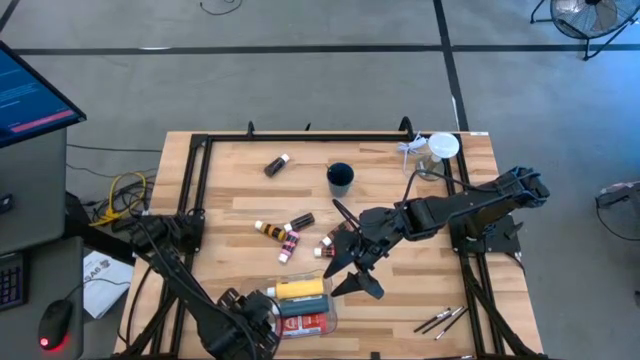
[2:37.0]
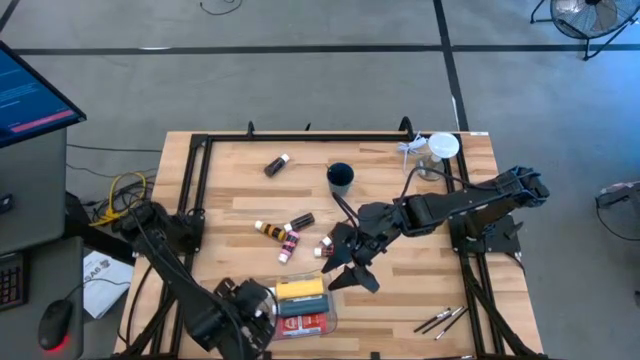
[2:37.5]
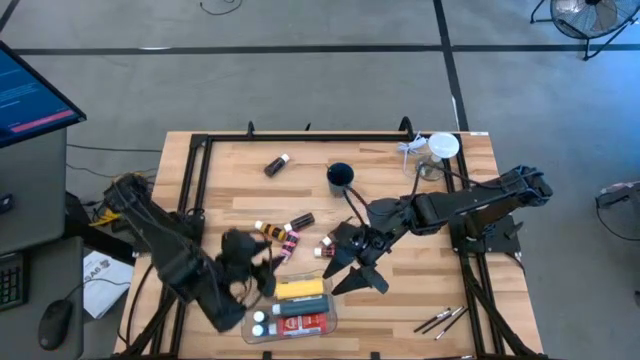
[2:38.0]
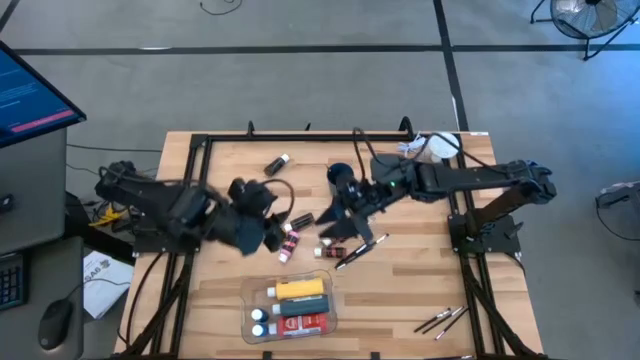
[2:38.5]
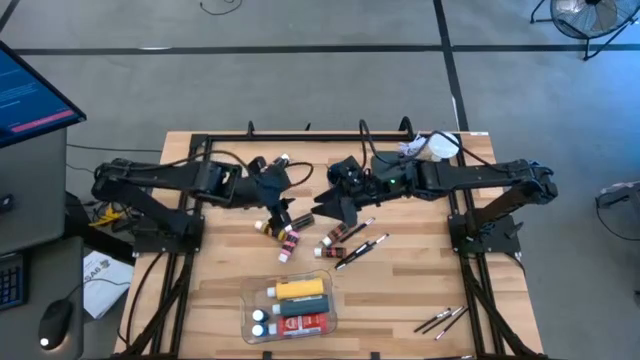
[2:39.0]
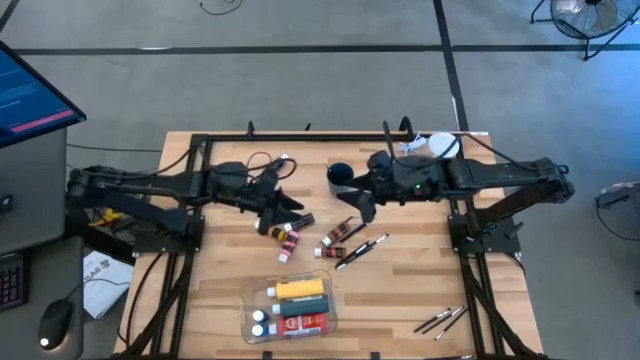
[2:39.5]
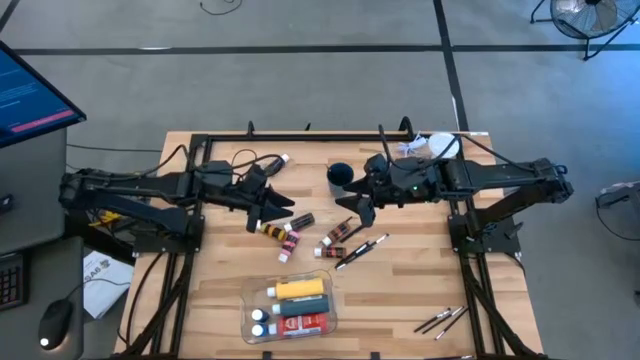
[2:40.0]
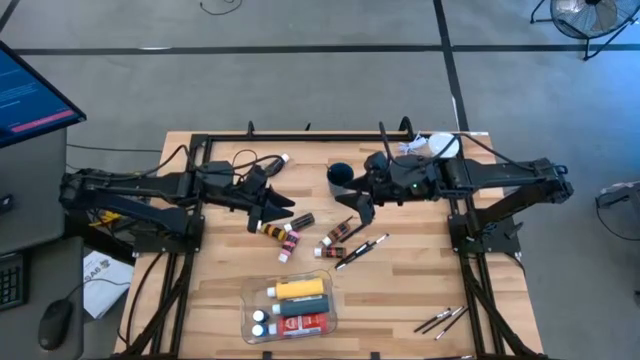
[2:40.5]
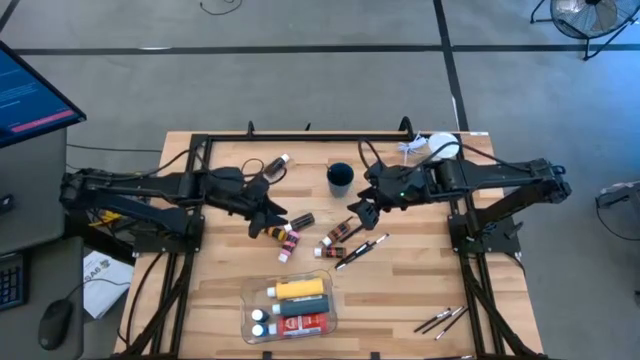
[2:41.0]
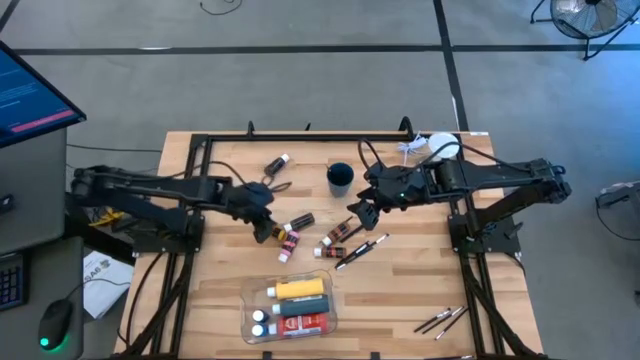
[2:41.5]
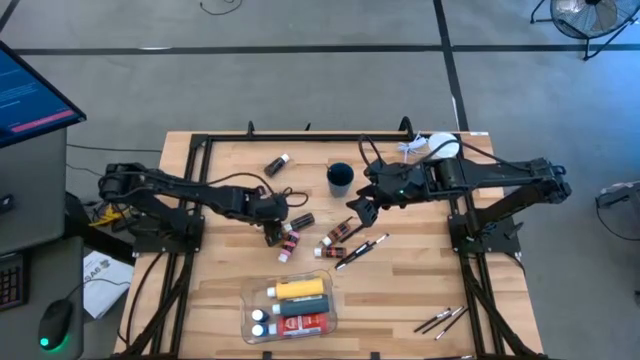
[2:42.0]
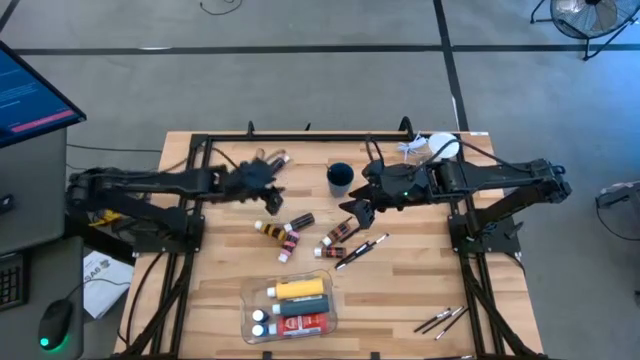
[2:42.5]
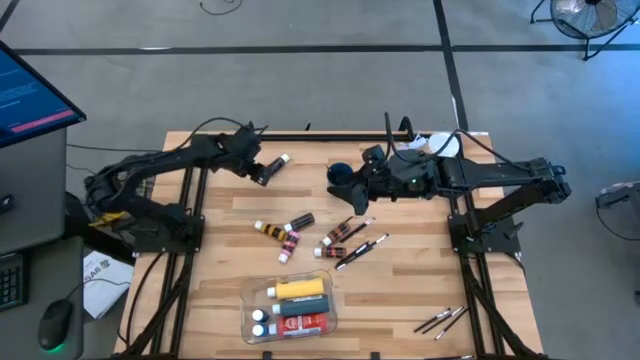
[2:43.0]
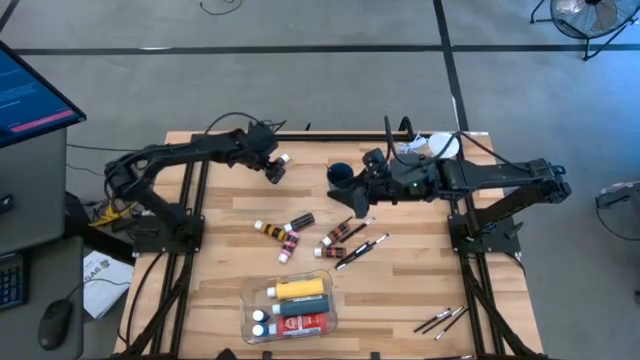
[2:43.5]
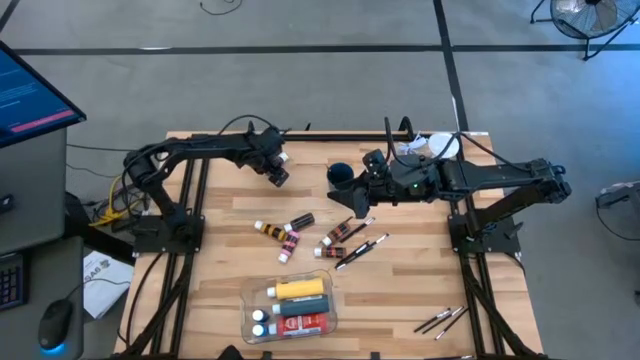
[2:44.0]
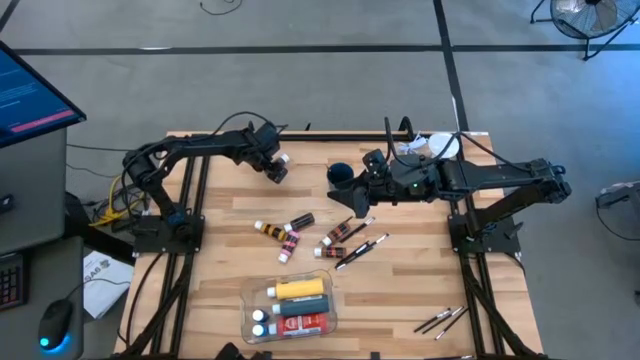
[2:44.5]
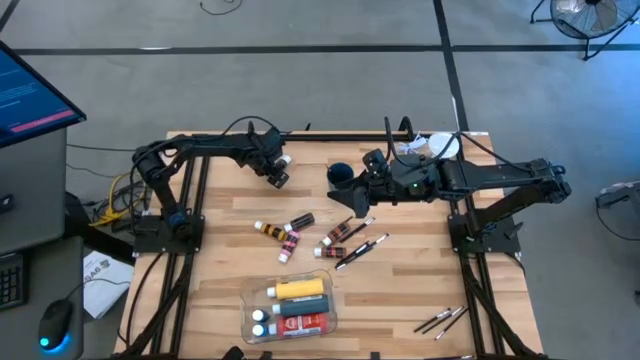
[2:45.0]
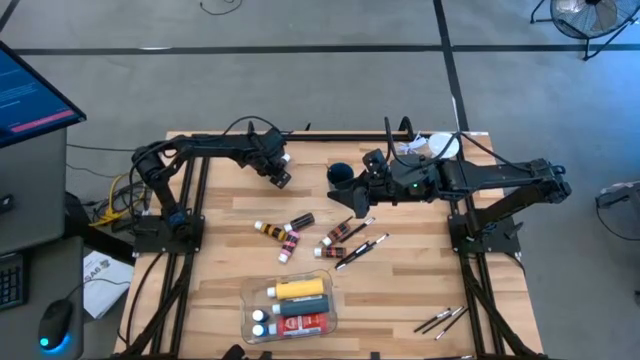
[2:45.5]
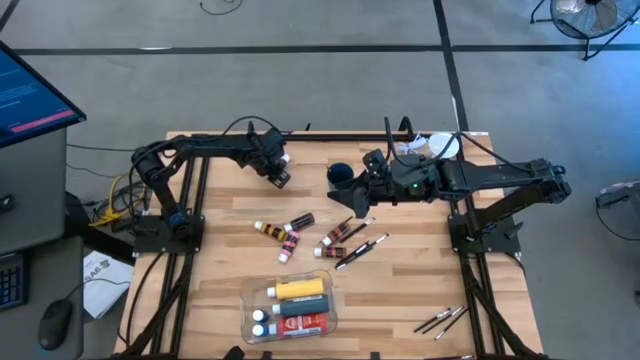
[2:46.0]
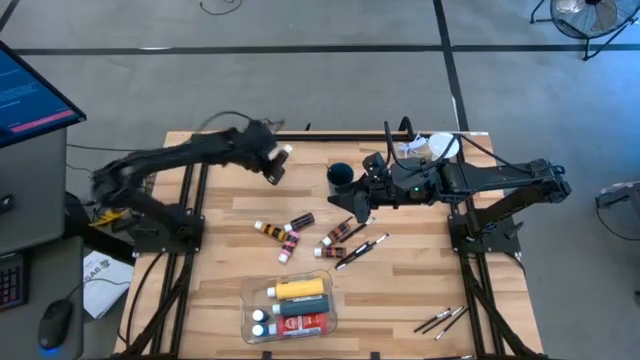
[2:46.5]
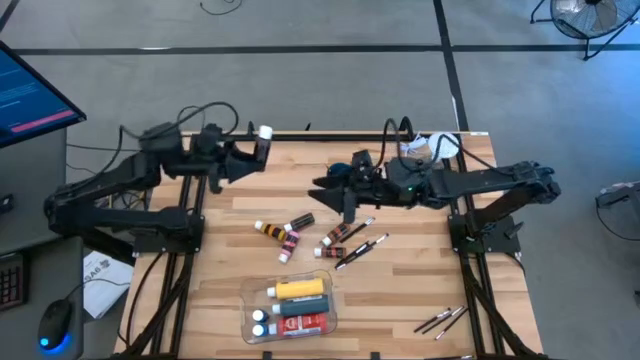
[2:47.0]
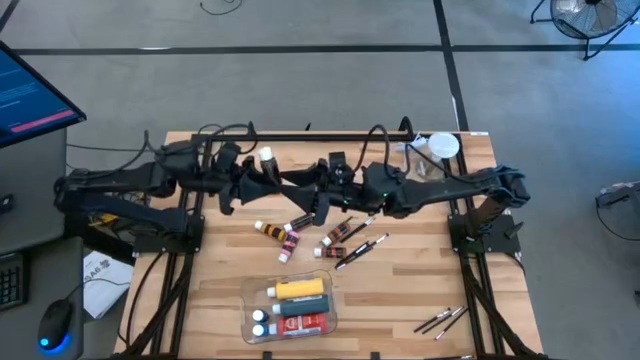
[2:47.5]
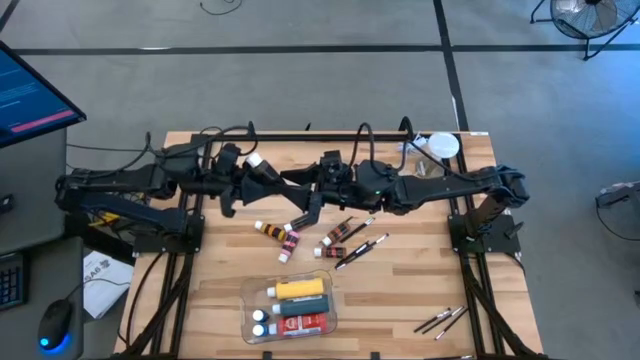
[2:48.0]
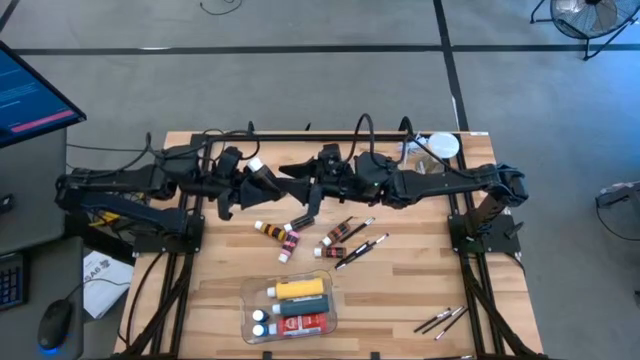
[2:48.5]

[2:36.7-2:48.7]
Task: Pick & Place Paint Supplies
Put the top small brown paint bottle into the transparent bin

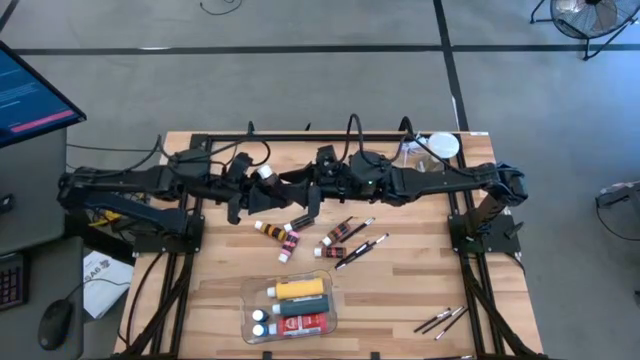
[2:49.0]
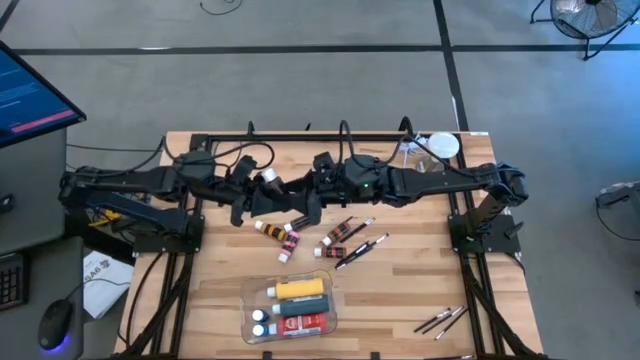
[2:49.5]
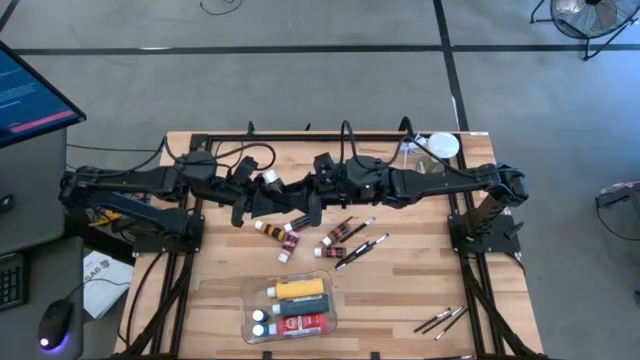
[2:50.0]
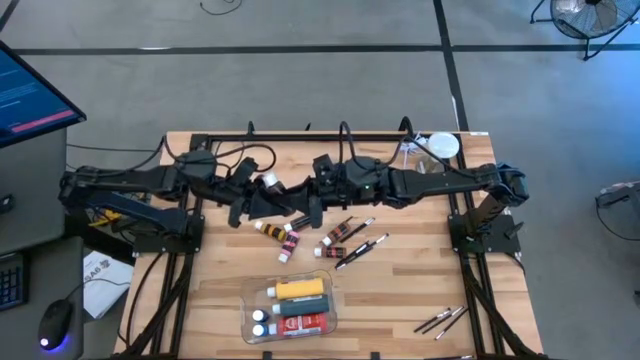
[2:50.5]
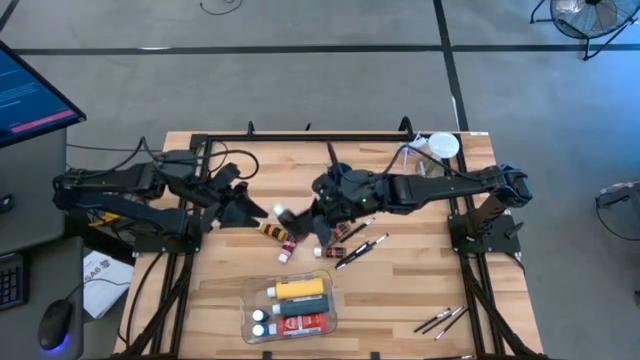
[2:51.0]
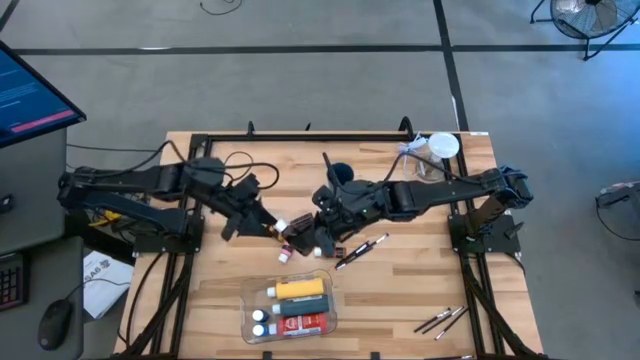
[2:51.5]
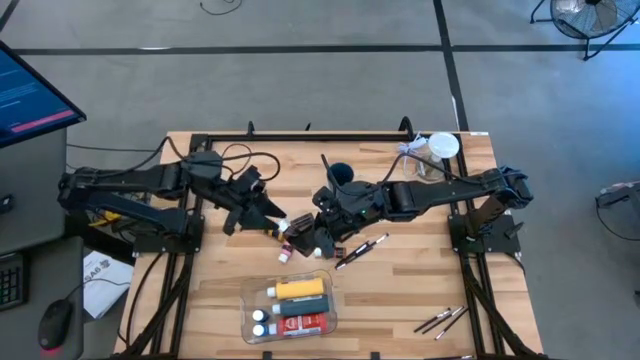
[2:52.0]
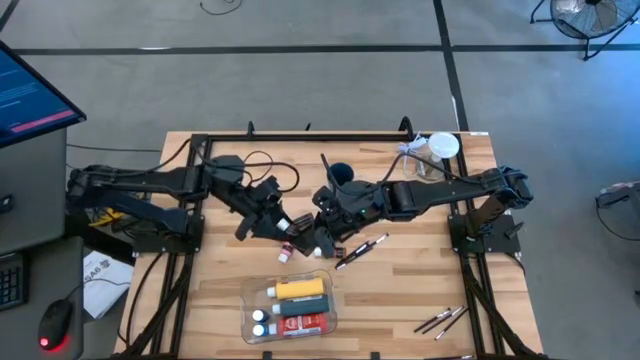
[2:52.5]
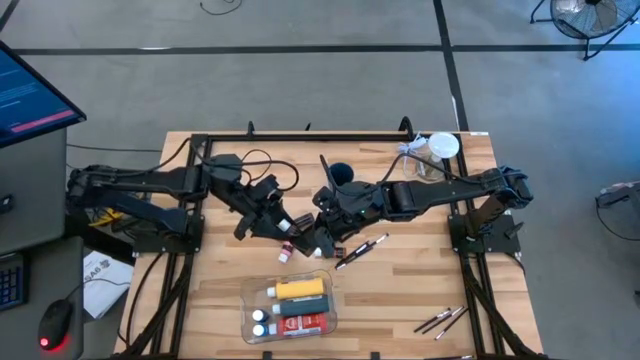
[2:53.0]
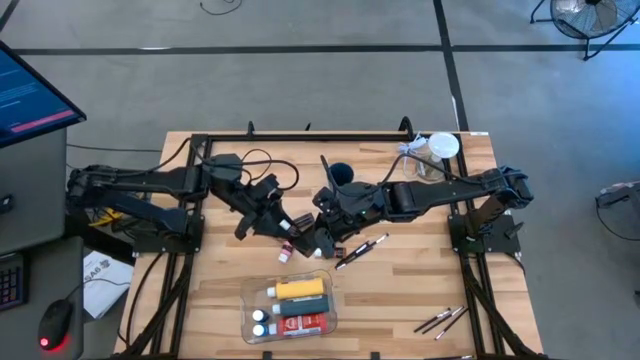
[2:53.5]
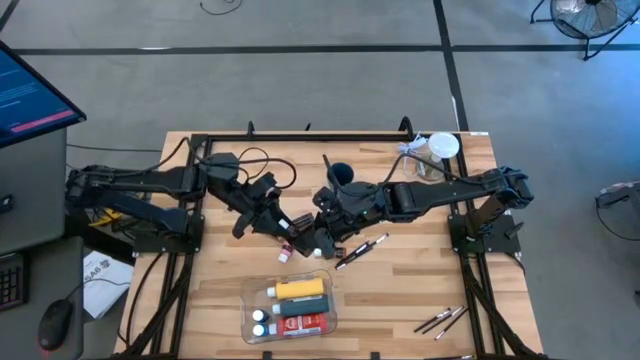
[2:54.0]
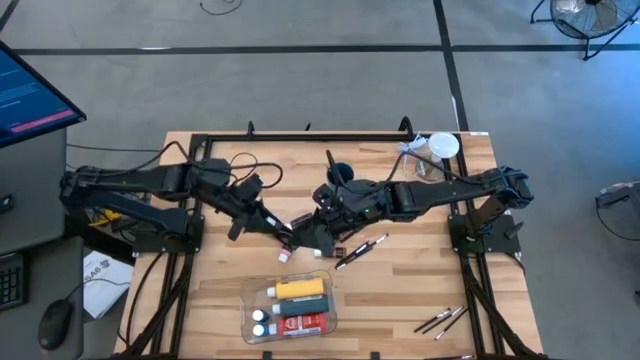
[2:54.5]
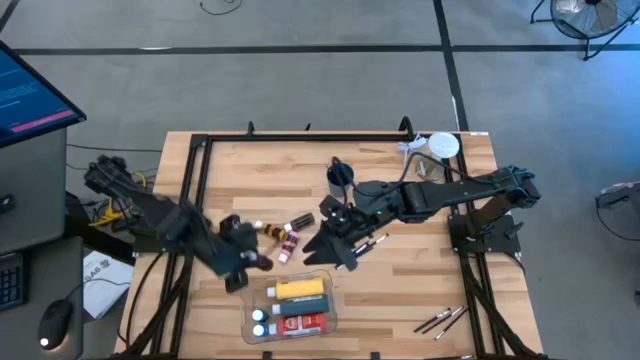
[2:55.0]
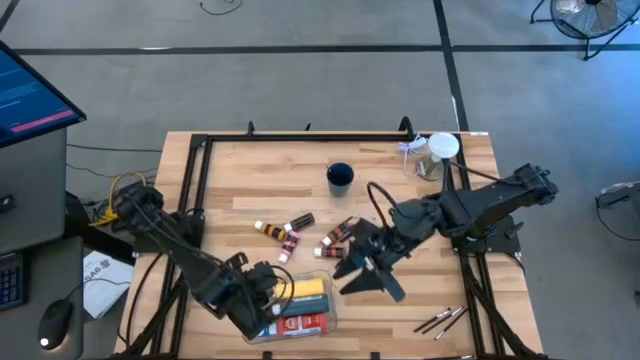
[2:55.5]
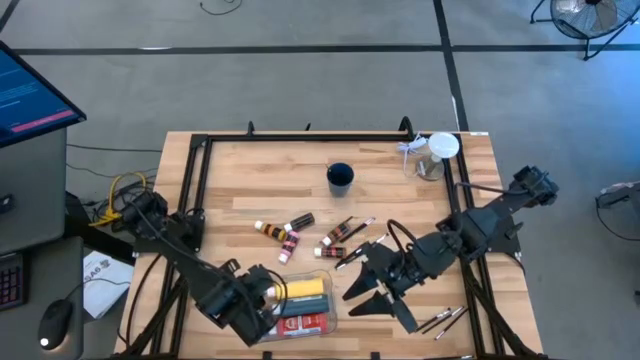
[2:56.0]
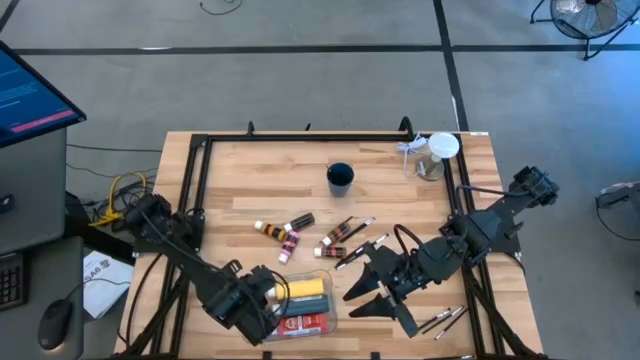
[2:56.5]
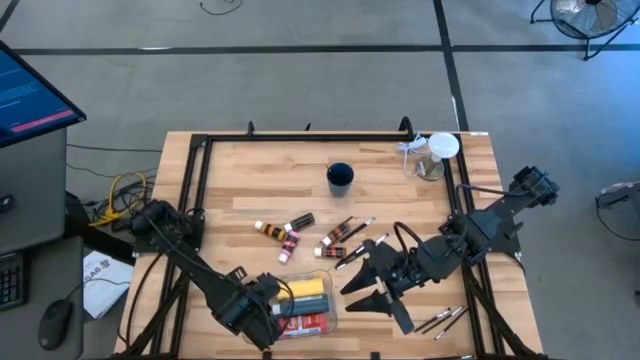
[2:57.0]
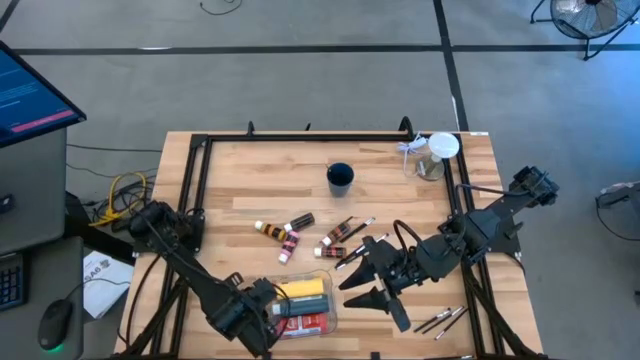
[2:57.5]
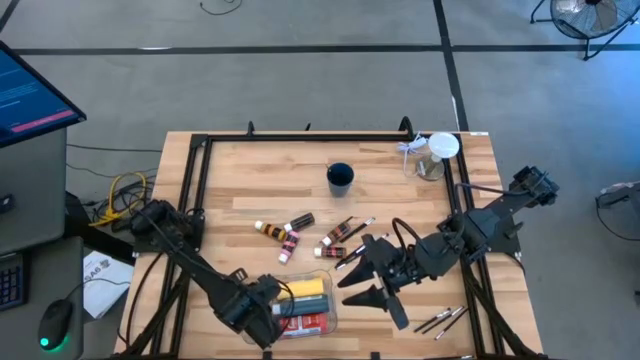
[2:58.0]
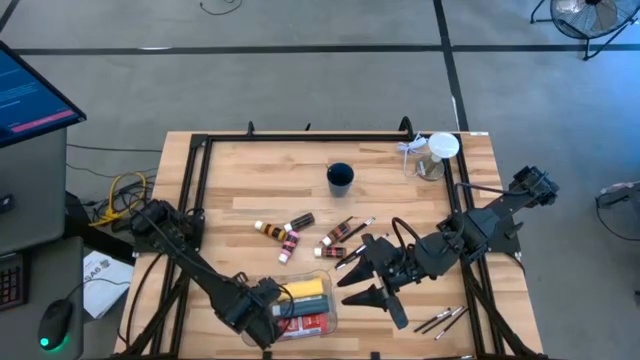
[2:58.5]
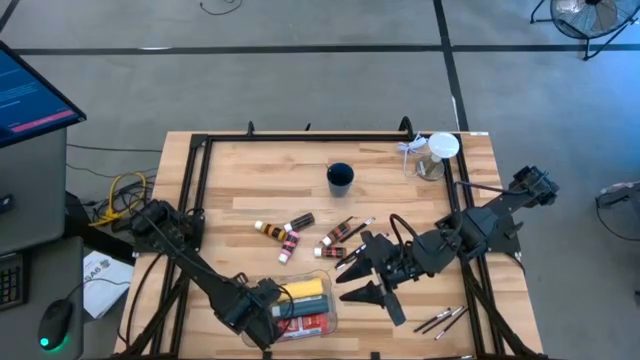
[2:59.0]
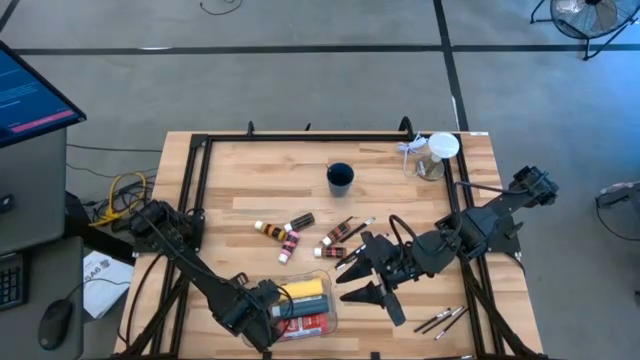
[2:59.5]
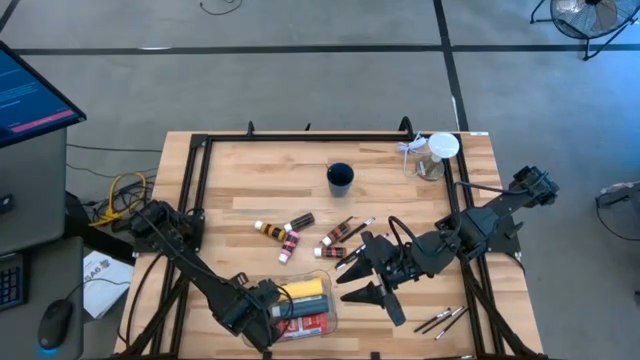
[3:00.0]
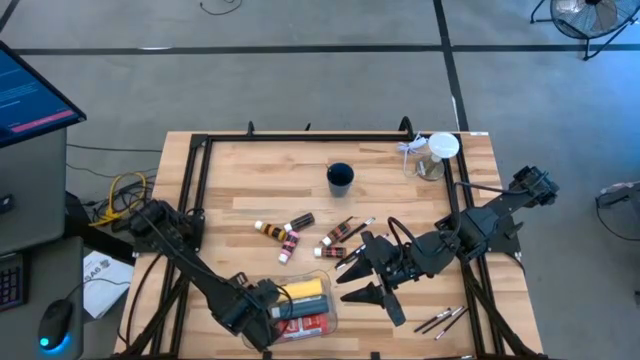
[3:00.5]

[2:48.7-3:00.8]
Put the top small brown paint bottle into the transparent bin
